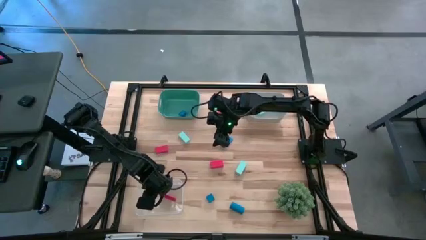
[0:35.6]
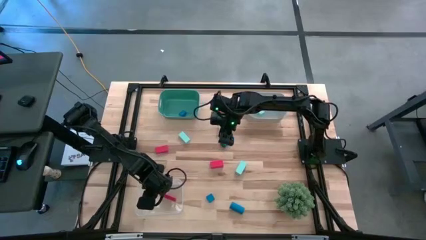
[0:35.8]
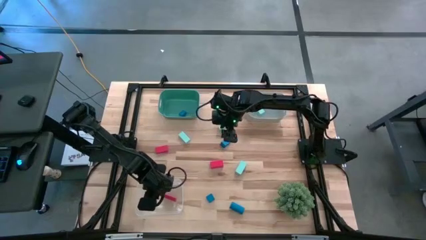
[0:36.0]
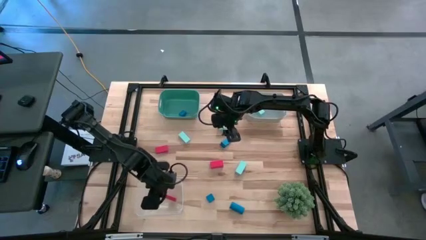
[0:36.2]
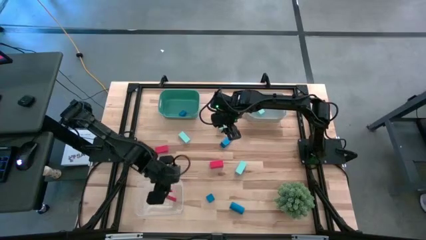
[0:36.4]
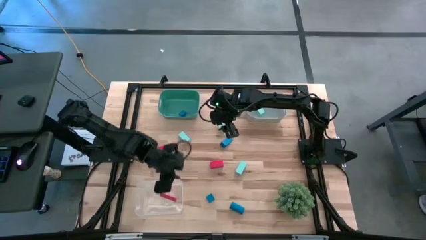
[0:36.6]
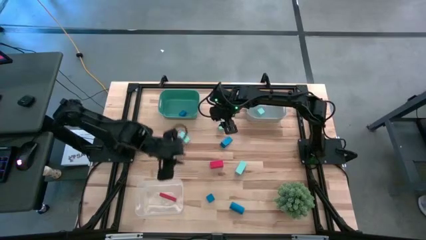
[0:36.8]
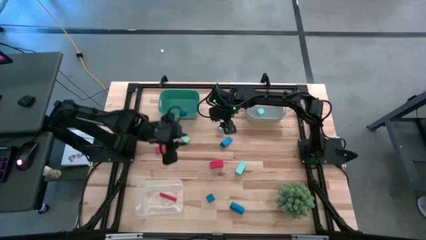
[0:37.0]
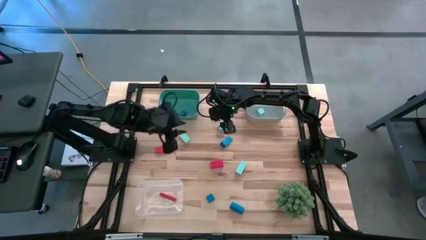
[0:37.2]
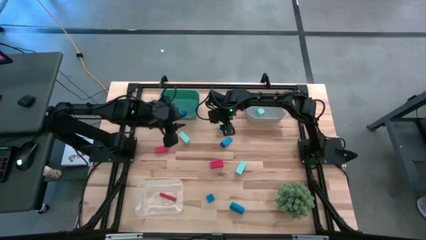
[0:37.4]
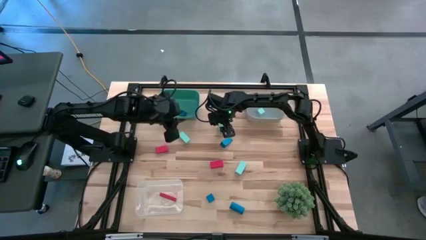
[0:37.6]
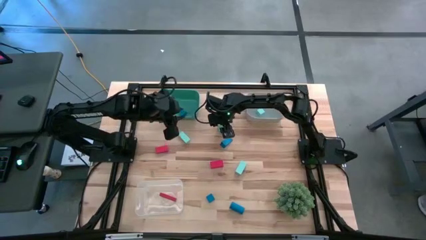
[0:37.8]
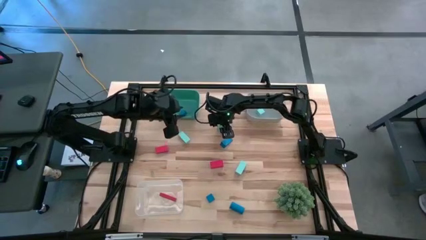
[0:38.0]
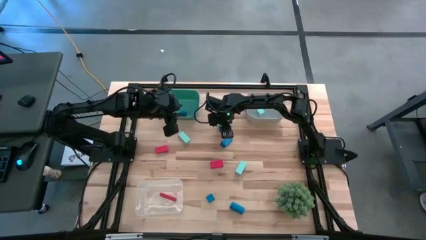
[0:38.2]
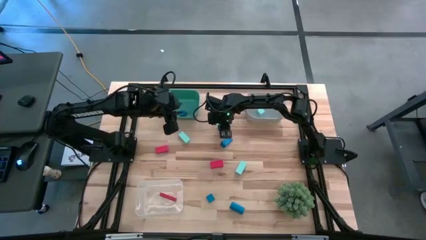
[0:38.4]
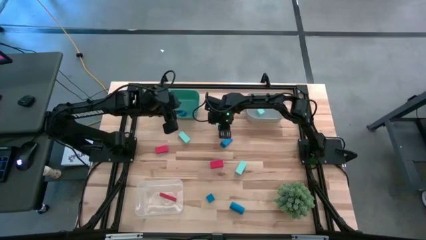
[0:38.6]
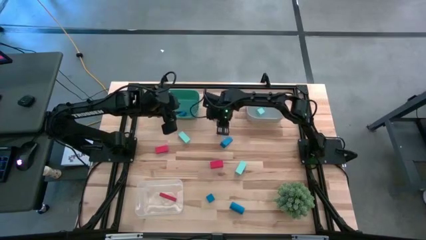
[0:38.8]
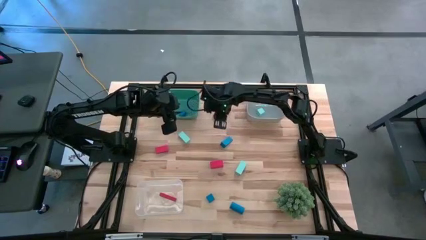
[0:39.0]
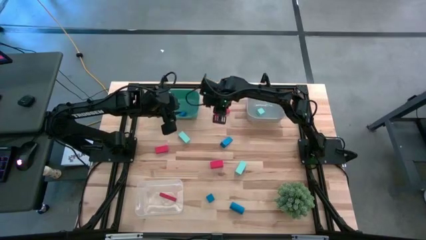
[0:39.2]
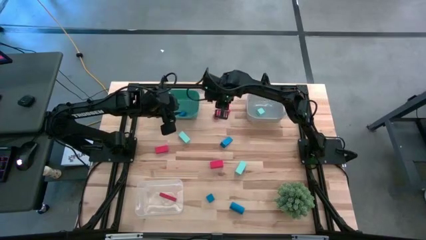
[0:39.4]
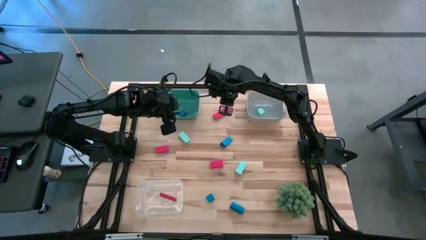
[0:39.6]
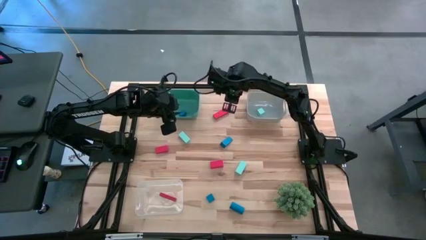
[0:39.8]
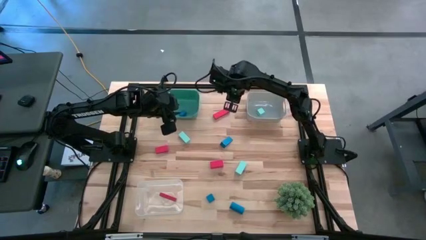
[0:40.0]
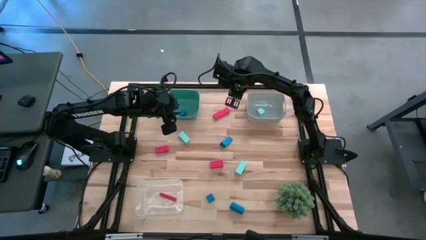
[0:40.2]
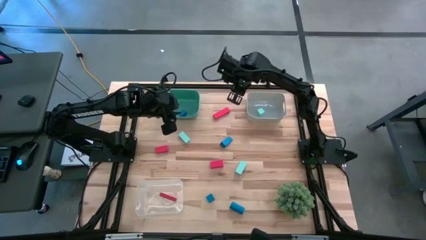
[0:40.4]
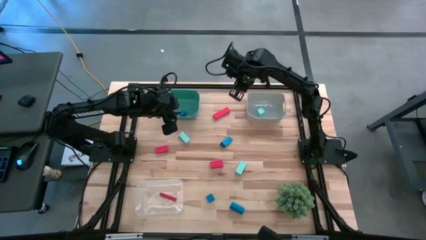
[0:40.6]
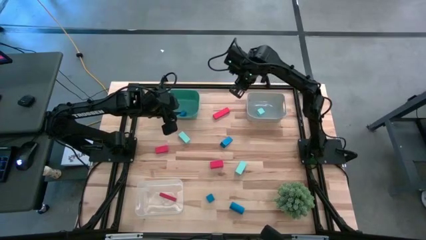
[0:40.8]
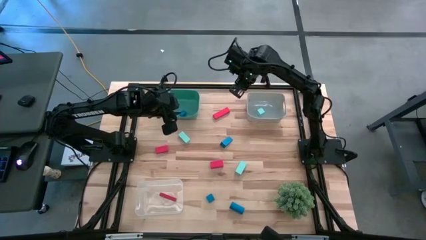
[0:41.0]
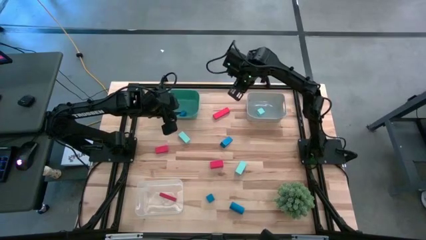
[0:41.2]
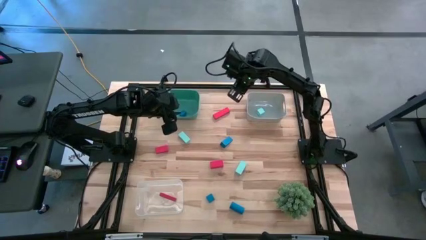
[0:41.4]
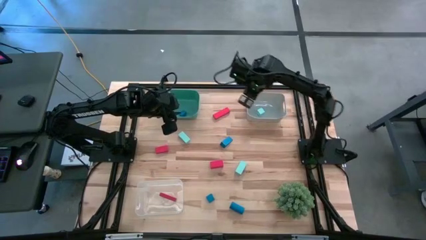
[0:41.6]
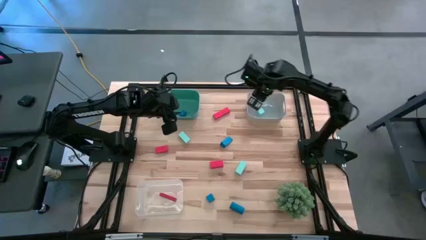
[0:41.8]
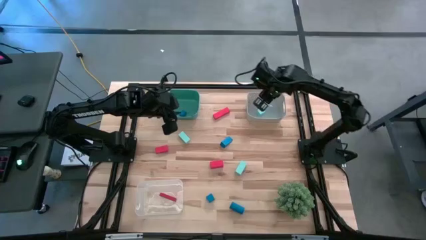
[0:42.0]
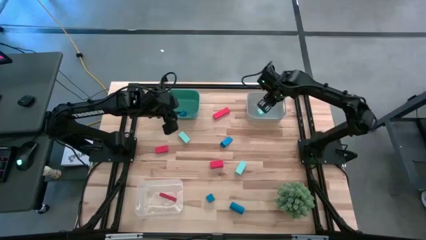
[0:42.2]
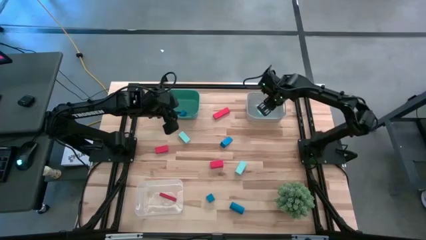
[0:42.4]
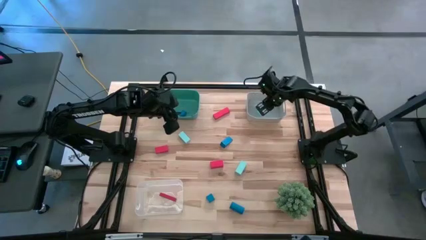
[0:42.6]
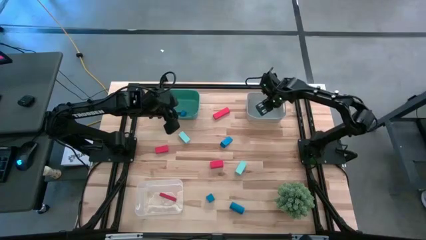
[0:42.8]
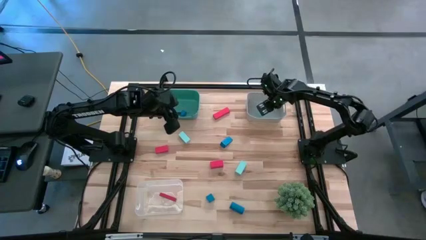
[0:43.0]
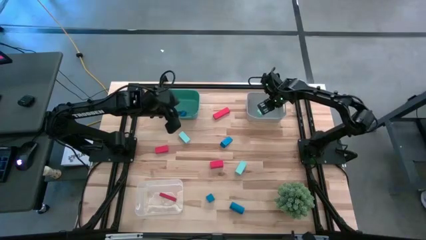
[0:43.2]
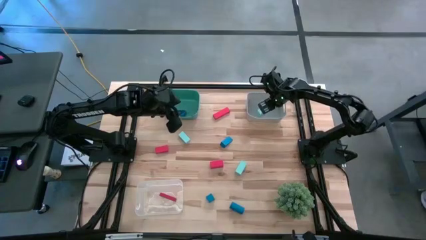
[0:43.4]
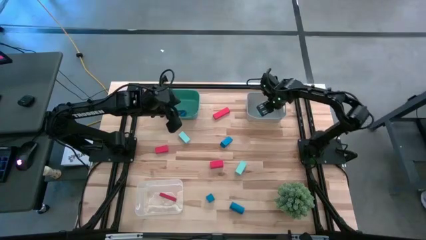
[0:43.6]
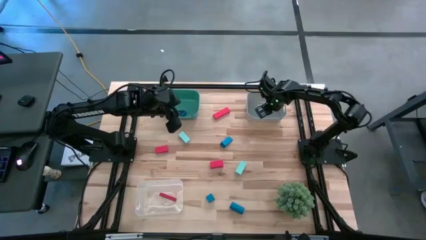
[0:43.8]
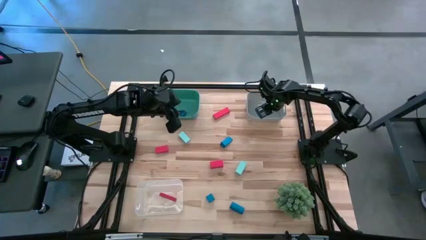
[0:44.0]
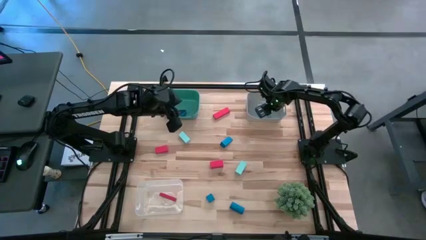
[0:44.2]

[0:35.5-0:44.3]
Task: Sort & place blocks by color
Put the light blue block into the grey bin

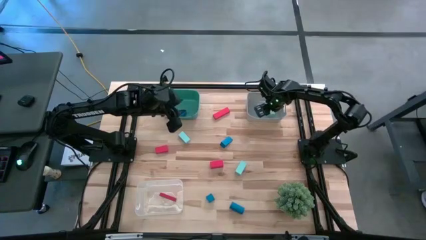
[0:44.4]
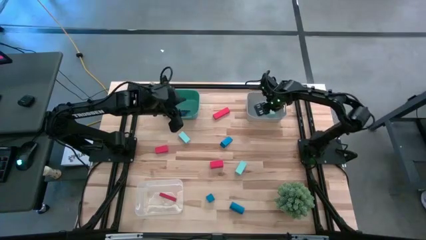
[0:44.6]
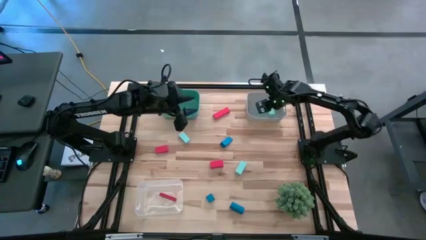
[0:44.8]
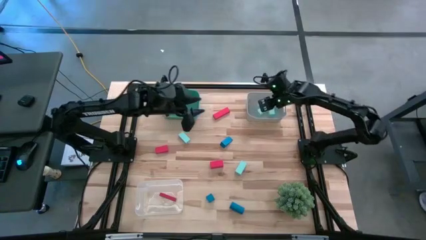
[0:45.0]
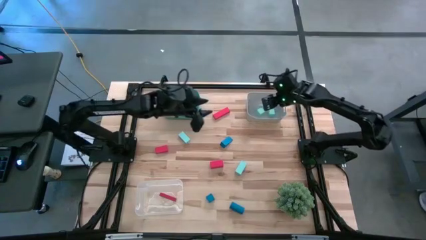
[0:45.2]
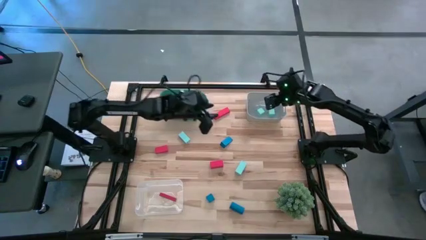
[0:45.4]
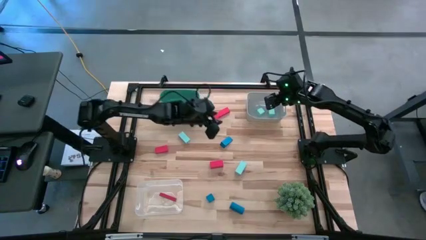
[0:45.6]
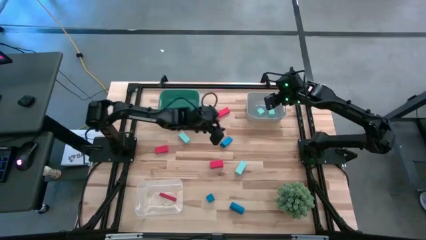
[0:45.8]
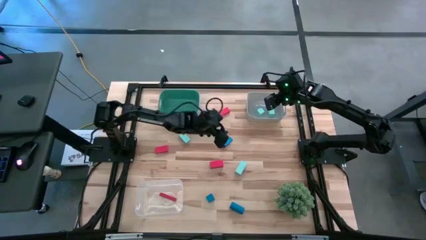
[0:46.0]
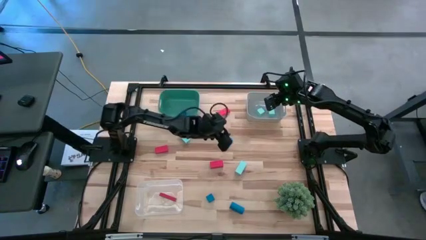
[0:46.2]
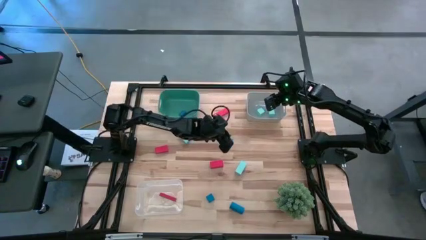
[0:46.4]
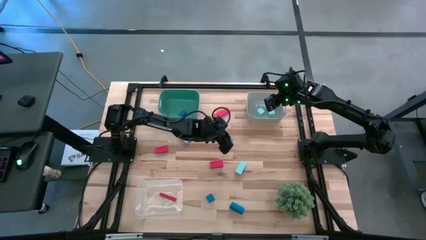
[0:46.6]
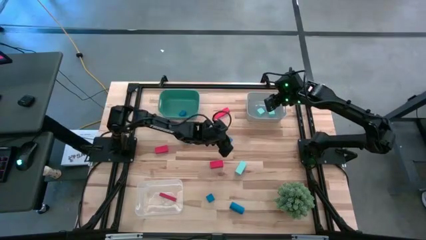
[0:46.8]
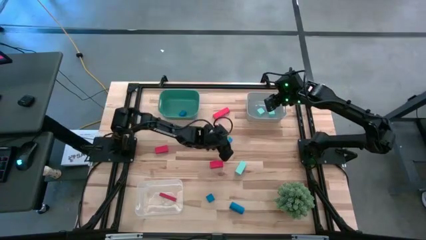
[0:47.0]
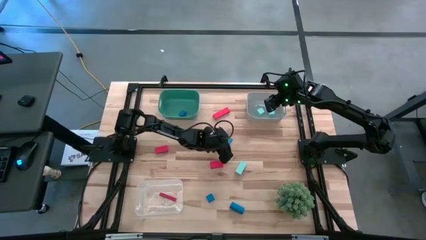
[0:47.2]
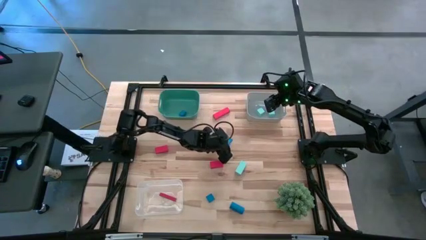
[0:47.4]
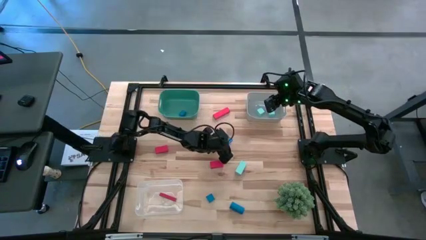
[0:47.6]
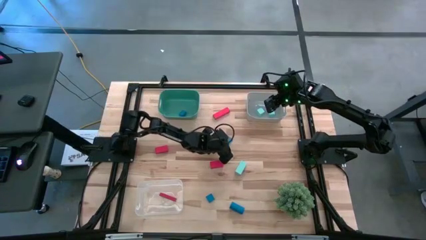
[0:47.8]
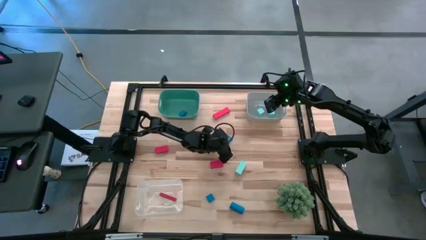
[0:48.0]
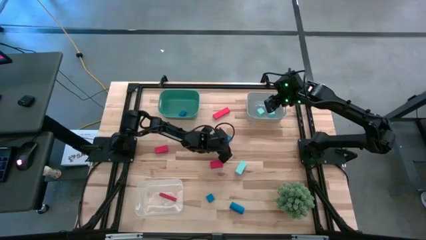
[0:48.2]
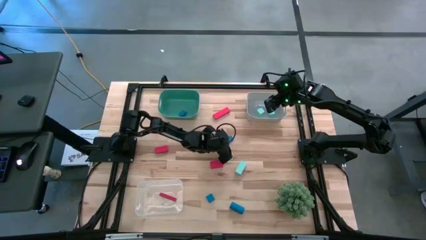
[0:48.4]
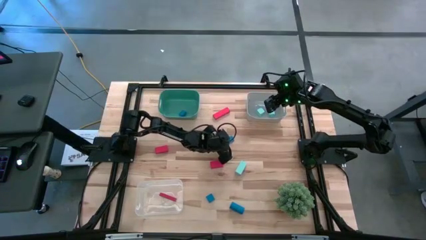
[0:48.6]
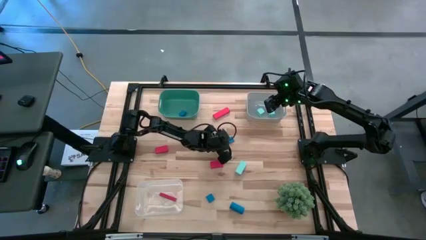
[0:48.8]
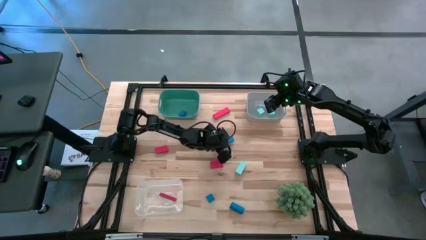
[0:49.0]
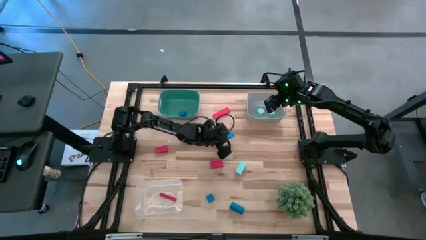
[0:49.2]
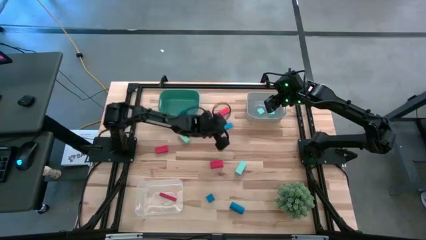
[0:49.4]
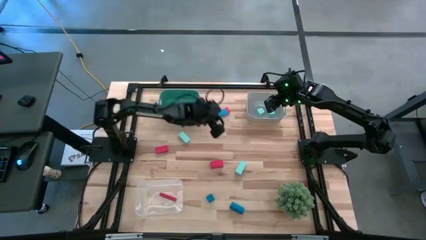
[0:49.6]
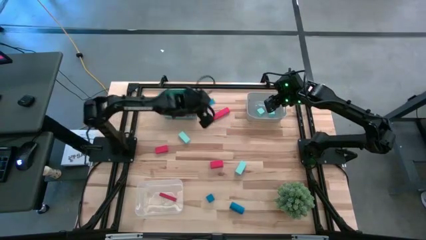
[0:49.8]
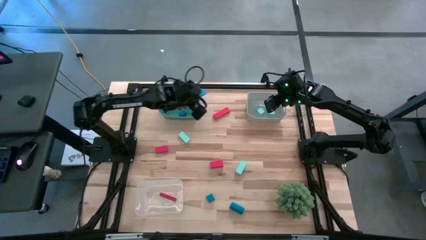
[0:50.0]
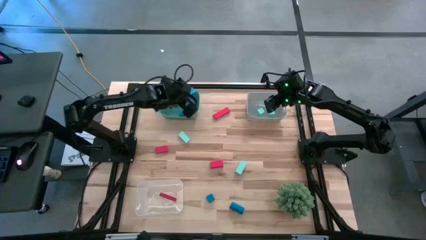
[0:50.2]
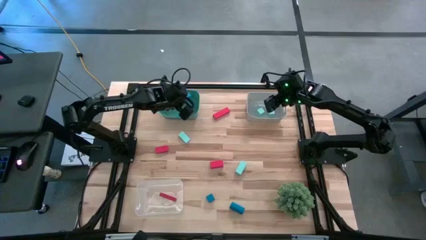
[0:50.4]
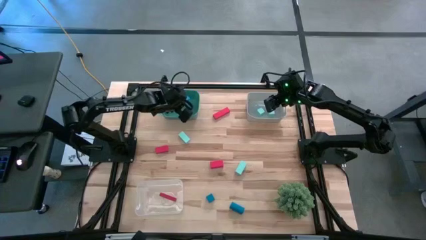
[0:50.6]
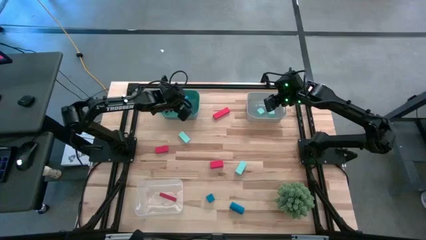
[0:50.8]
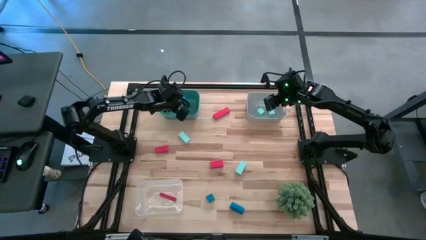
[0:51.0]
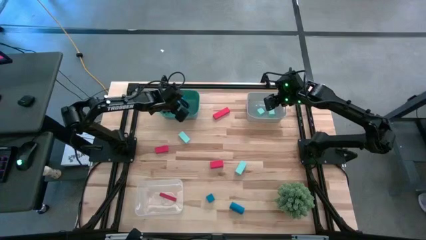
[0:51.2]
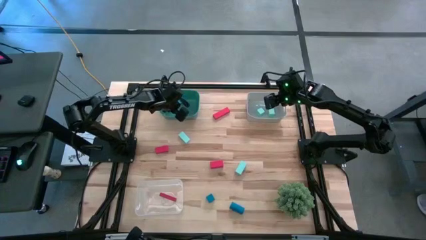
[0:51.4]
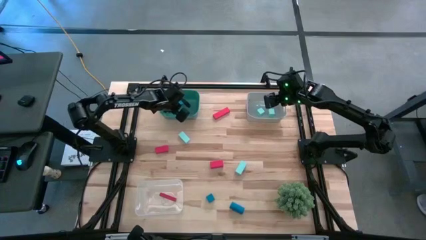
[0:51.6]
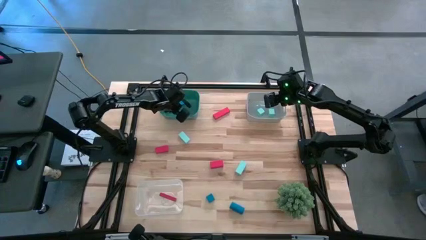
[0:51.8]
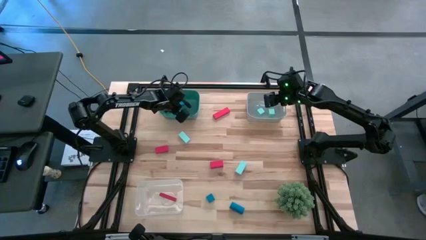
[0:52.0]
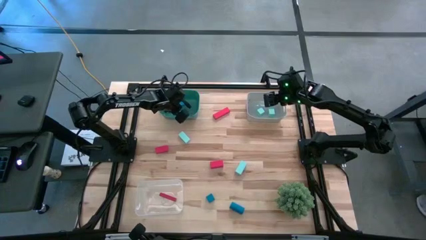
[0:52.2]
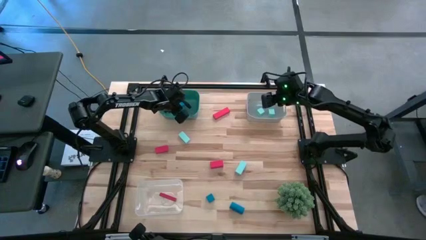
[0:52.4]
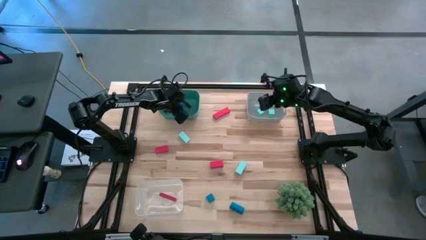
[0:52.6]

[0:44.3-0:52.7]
Put the blue block into the green bin
